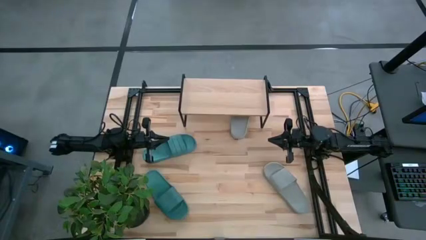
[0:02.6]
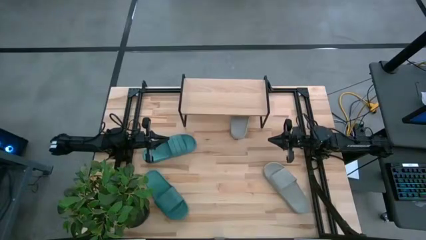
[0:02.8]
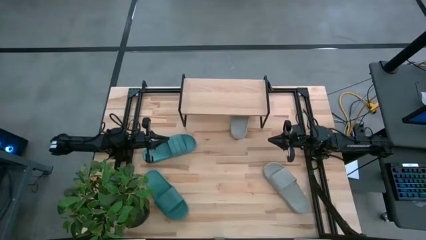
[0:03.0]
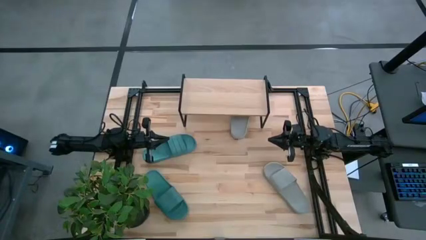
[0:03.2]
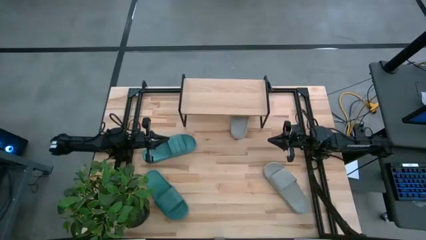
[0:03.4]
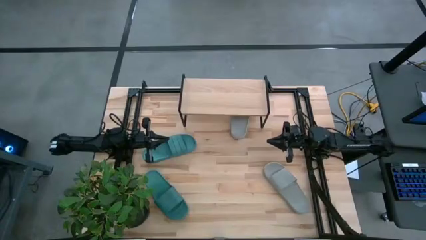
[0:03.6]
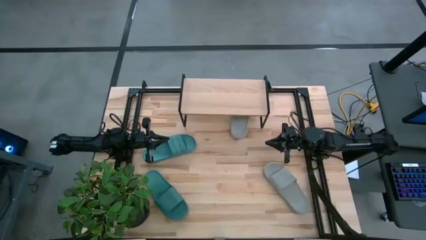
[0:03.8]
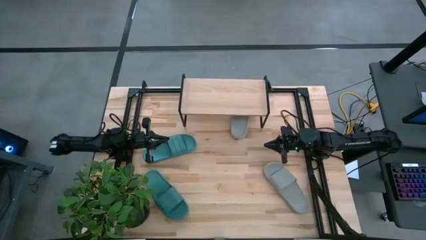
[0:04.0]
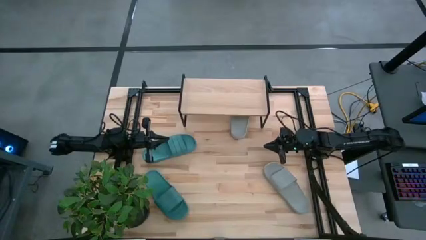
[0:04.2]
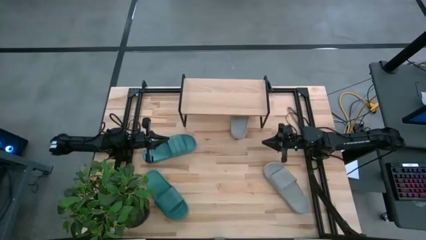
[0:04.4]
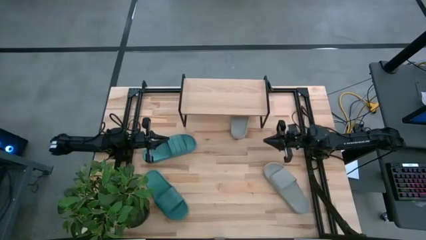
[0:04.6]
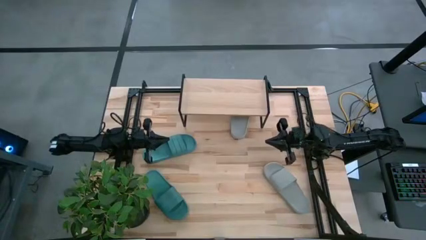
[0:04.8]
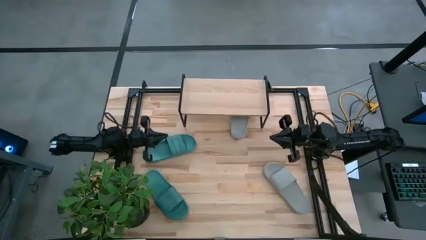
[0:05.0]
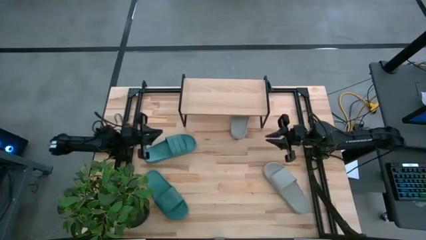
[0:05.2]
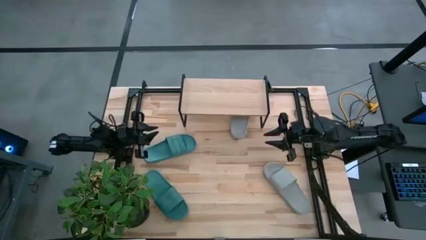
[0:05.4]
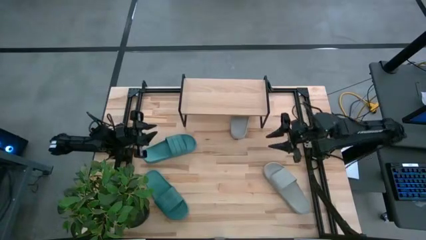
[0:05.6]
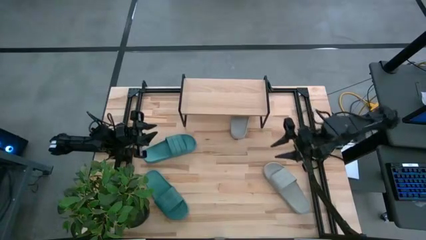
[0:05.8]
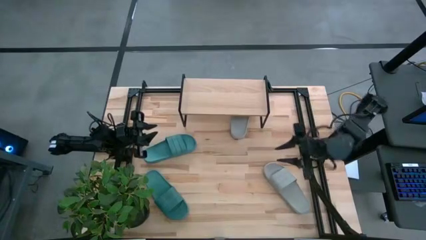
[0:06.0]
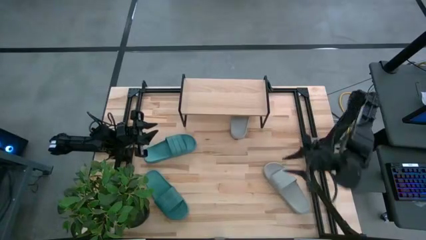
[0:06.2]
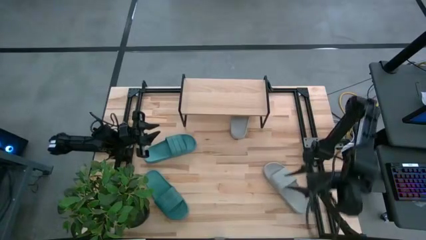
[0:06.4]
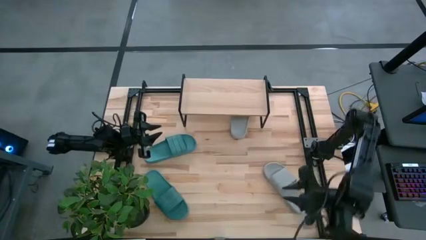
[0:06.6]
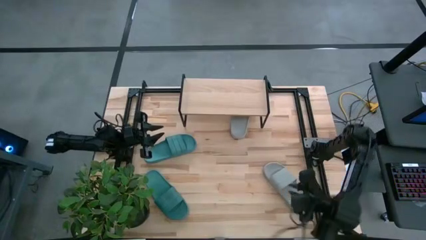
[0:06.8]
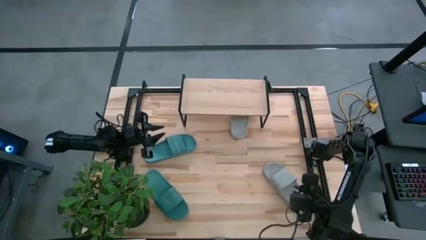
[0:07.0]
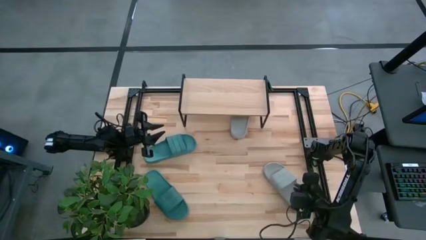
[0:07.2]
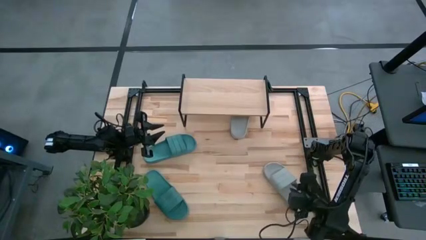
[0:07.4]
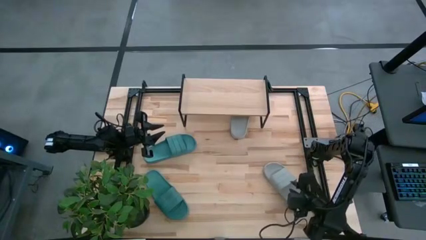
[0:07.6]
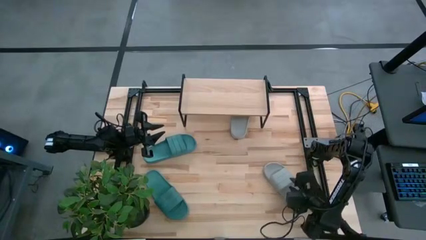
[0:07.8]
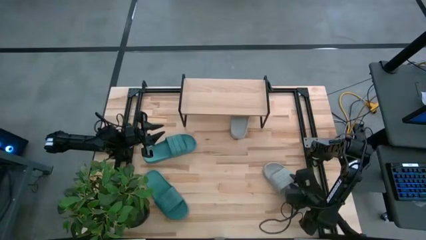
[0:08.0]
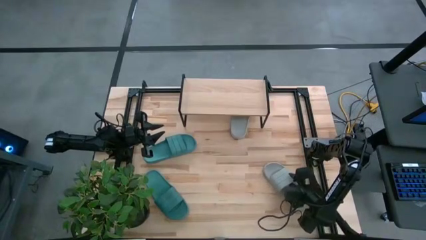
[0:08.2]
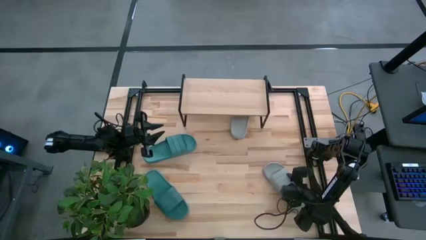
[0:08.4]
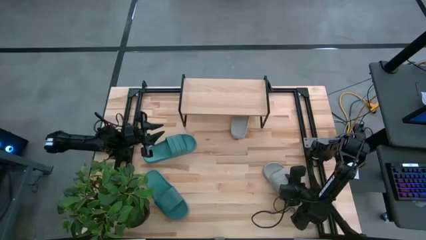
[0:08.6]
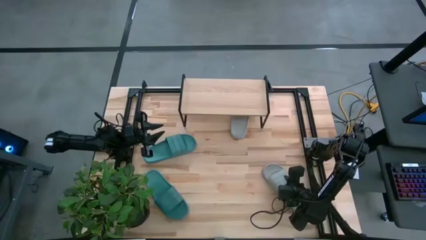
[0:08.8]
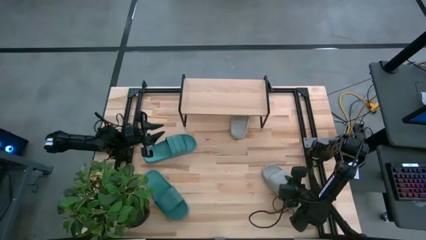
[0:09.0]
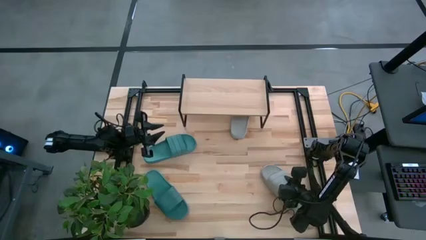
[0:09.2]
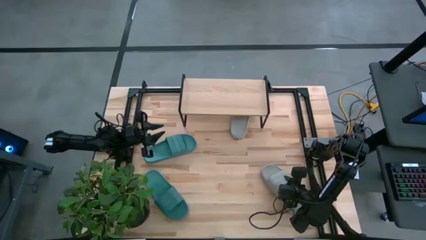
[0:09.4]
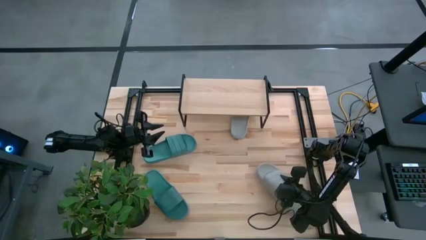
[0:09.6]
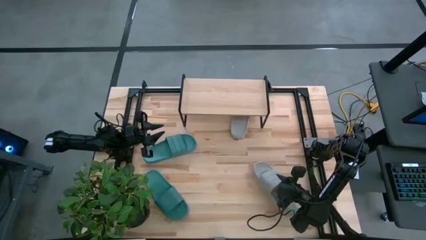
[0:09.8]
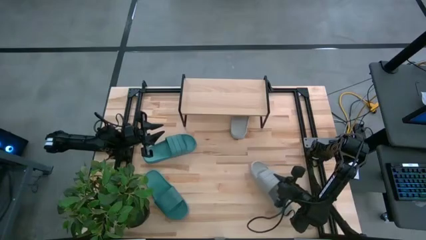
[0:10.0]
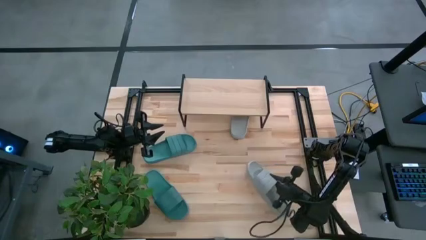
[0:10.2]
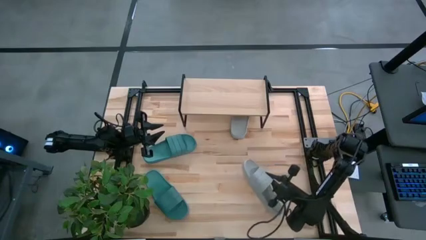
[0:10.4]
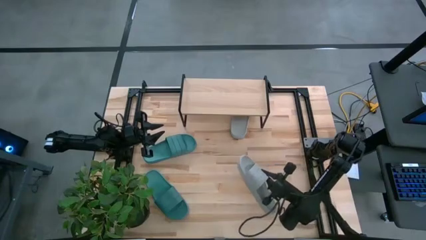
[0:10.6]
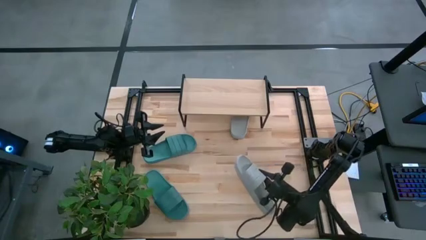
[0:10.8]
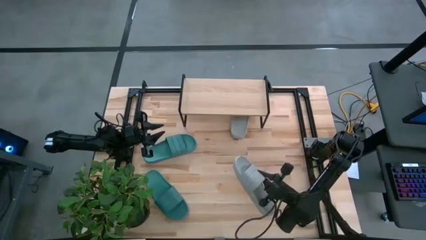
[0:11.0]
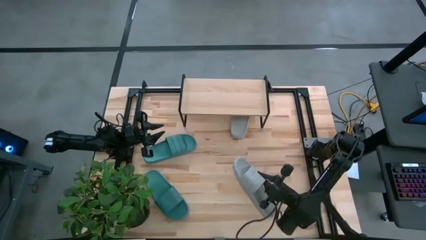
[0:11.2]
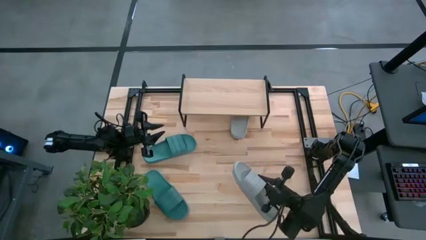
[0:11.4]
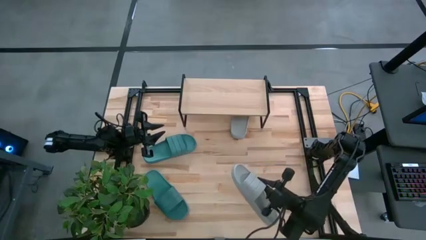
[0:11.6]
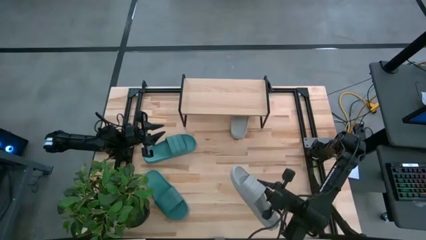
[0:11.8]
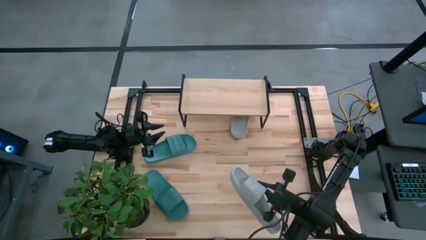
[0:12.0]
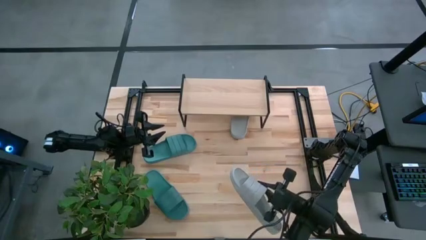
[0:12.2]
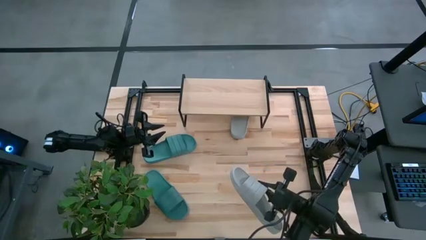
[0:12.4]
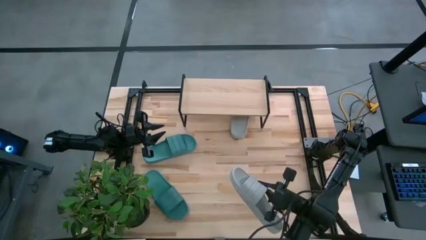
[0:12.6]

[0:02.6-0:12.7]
Task: Pick and place slides into the shelf
Put the bottom gray slipper on the shelf

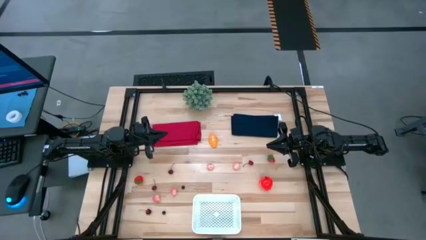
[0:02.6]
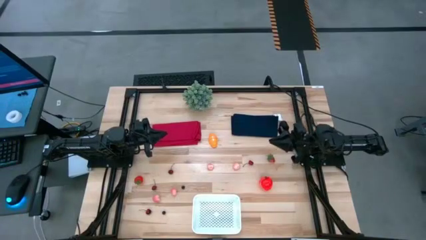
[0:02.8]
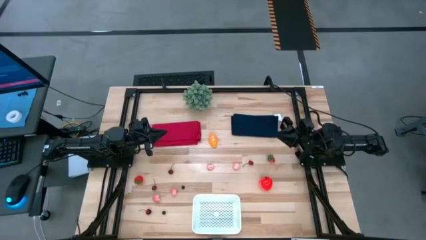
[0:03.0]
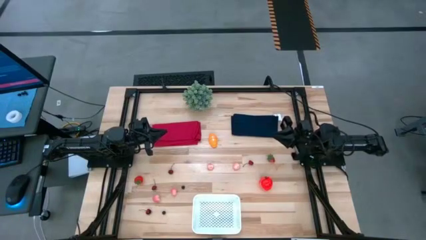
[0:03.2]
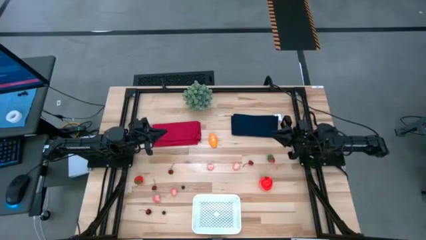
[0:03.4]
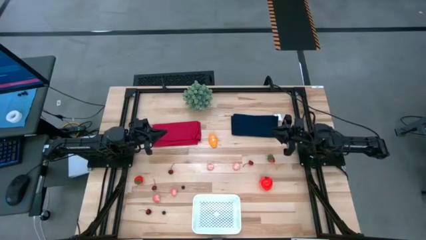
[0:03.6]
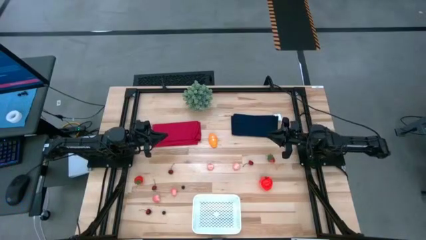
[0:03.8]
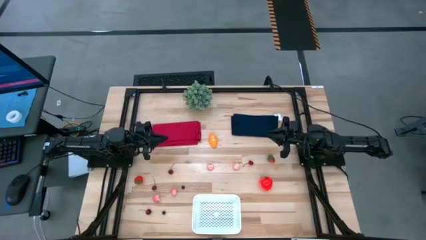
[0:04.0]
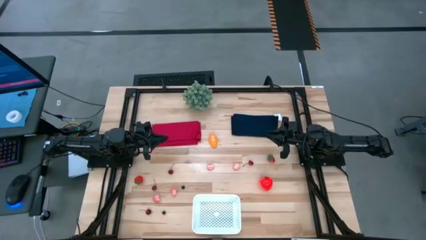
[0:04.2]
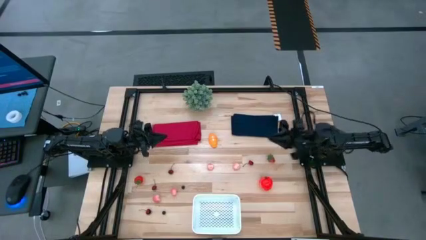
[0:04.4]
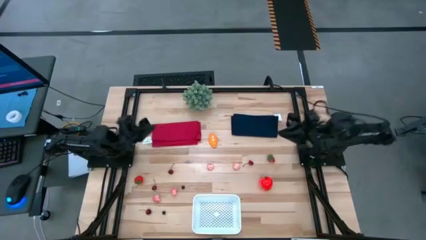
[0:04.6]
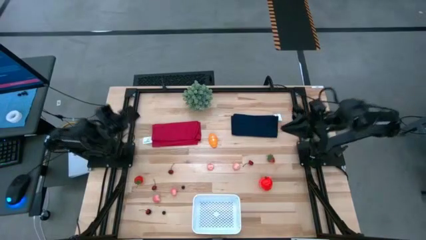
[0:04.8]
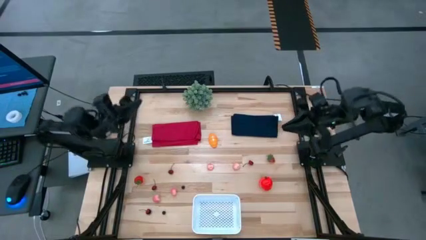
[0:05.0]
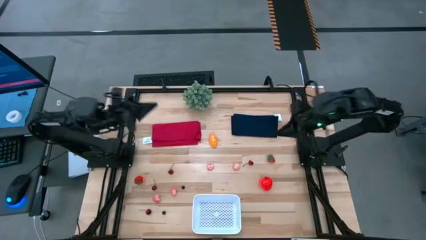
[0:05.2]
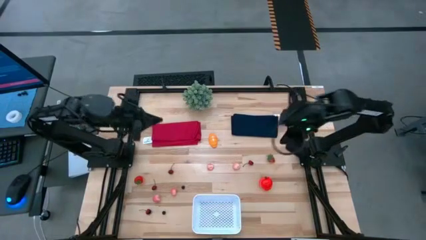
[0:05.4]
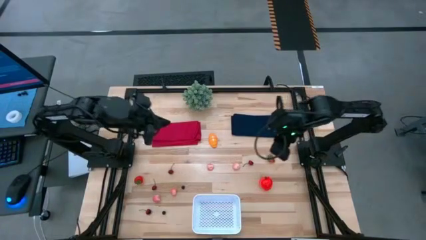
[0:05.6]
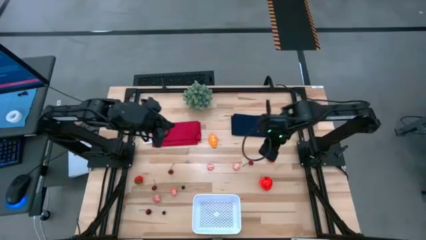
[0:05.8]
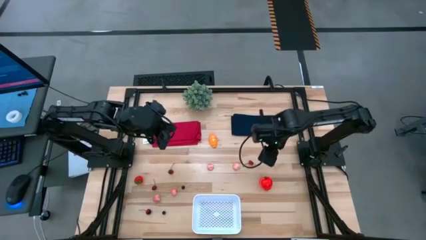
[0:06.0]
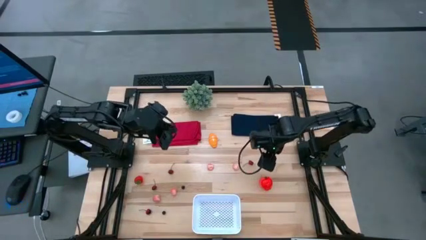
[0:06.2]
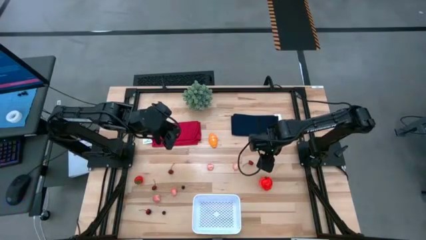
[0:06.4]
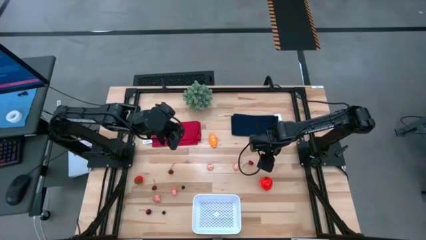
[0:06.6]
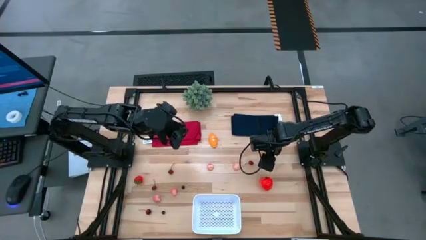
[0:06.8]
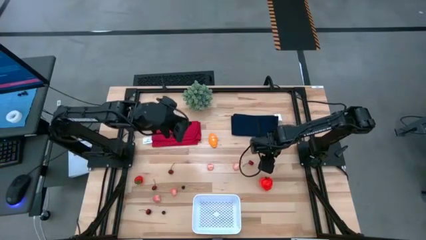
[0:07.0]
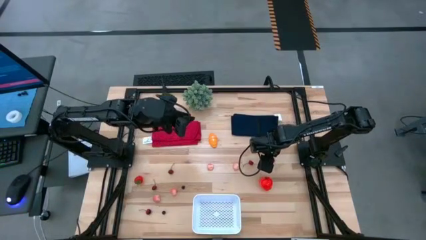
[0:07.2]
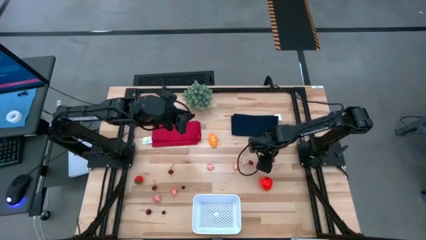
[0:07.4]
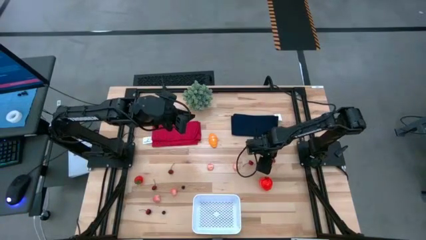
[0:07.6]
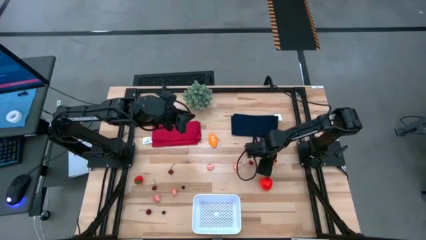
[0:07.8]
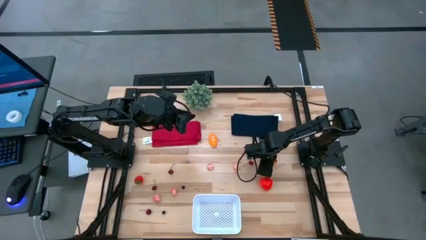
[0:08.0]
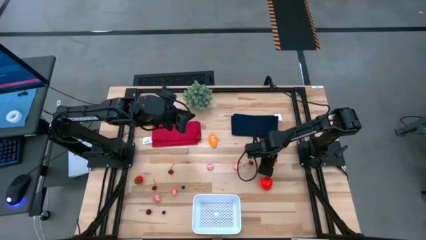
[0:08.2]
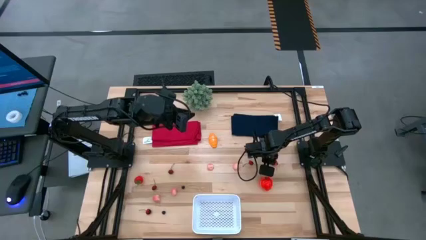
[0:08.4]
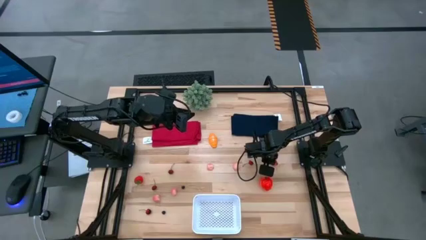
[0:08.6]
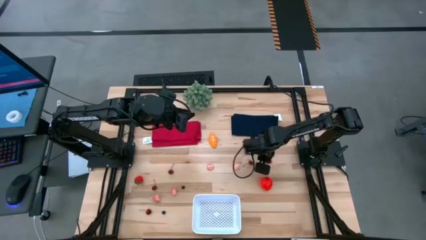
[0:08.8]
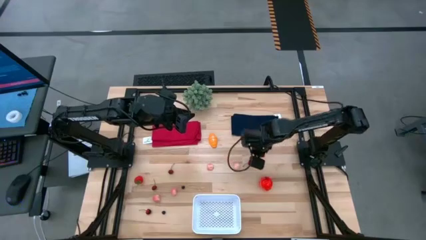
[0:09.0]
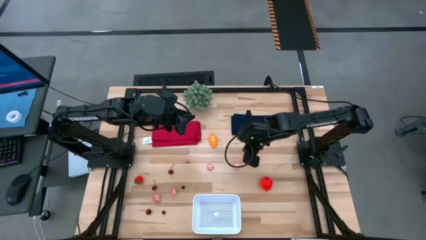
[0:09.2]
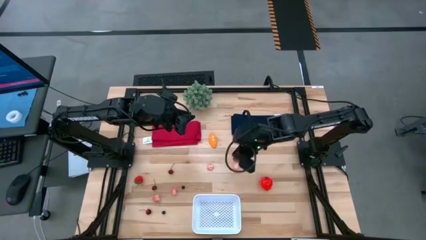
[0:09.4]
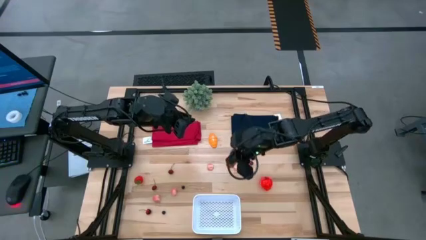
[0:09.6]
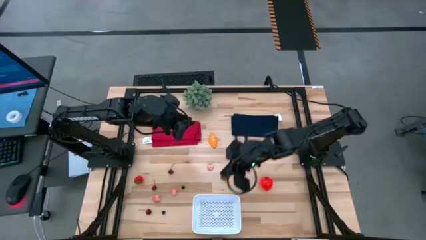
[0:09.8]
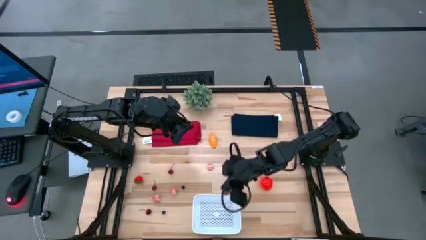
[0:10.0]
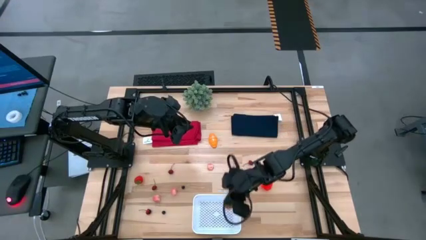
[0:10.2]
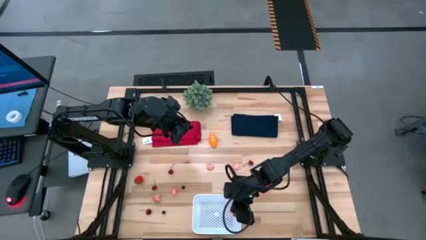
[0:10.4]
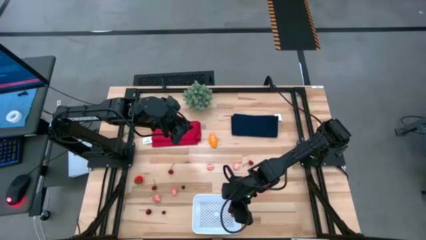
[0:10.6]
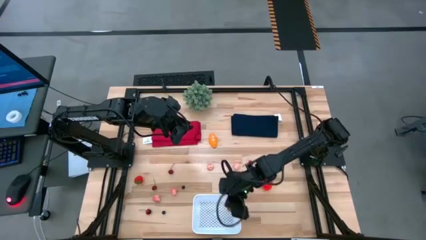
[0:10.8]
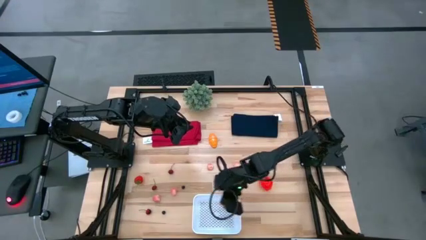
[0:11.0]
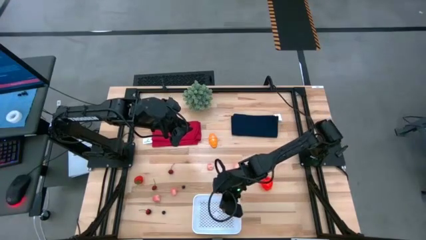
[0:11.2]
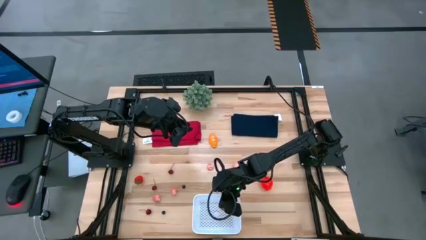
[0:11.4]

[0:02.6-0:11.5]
Task: Pick and placing Produce into tupperware
Put the right strawberry into the white bin
